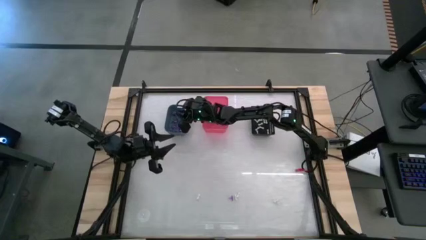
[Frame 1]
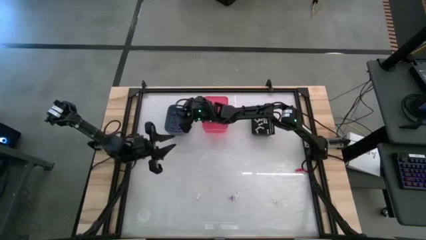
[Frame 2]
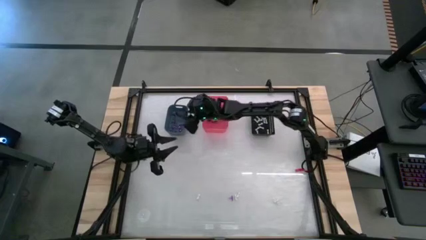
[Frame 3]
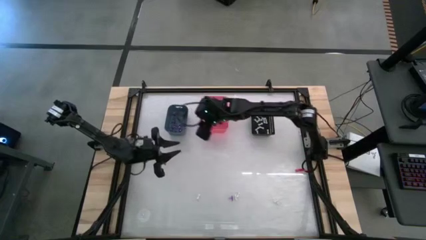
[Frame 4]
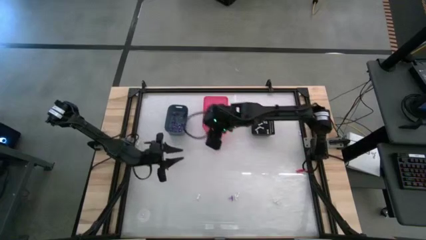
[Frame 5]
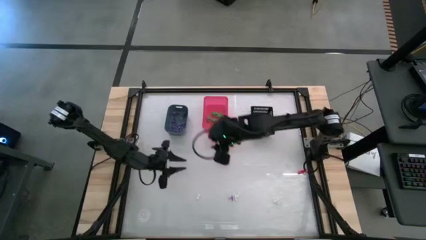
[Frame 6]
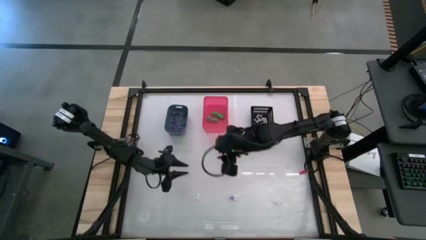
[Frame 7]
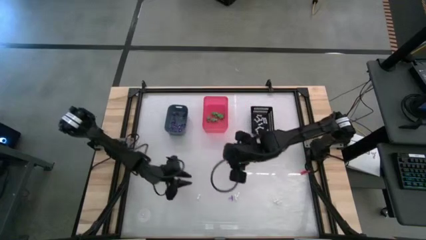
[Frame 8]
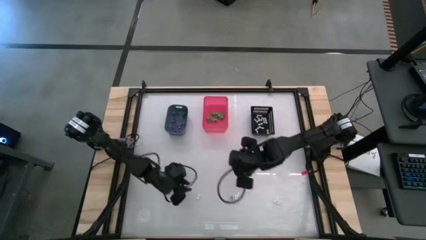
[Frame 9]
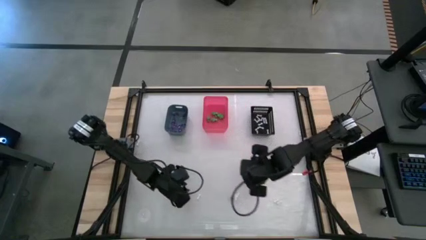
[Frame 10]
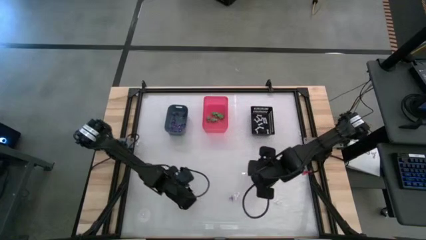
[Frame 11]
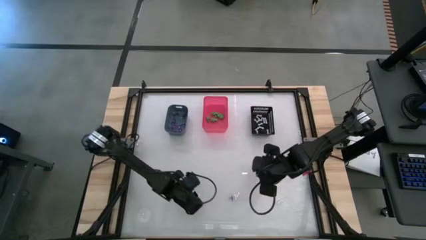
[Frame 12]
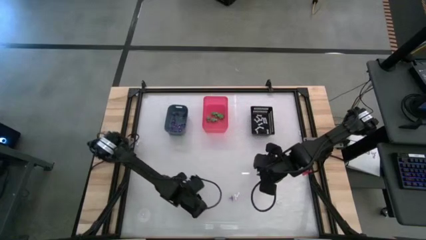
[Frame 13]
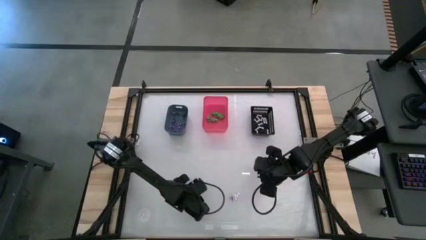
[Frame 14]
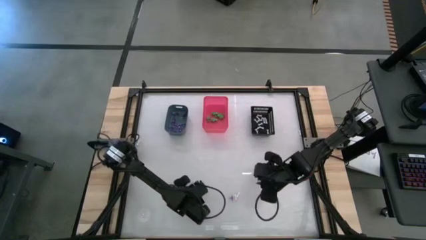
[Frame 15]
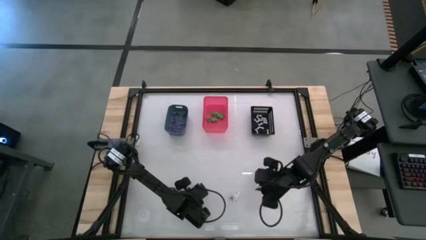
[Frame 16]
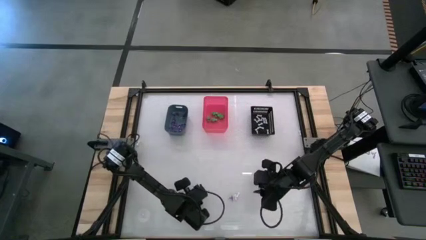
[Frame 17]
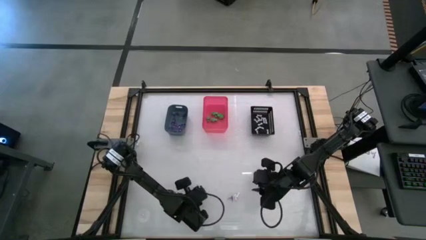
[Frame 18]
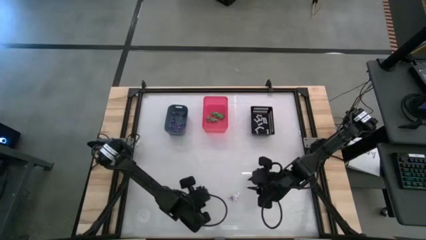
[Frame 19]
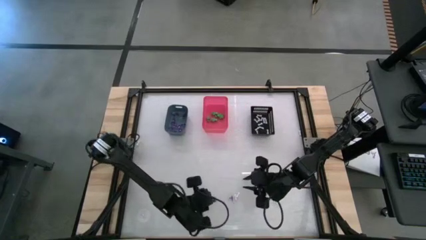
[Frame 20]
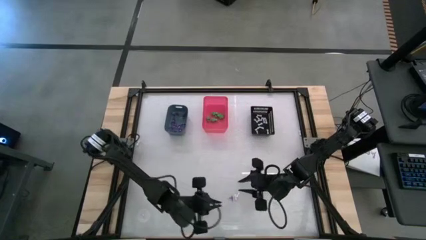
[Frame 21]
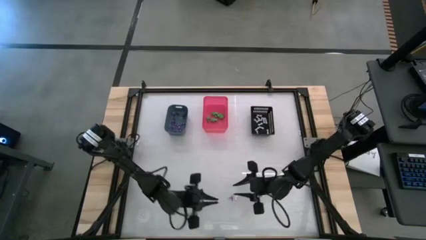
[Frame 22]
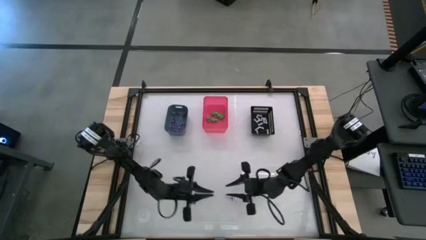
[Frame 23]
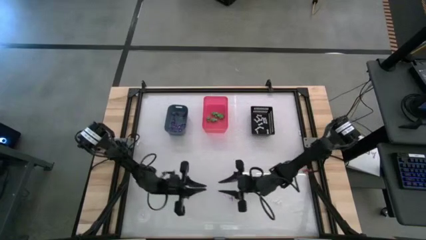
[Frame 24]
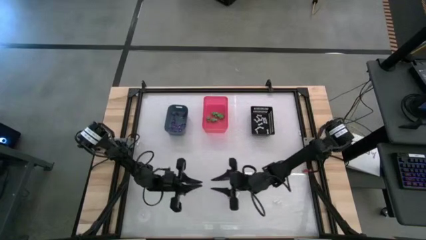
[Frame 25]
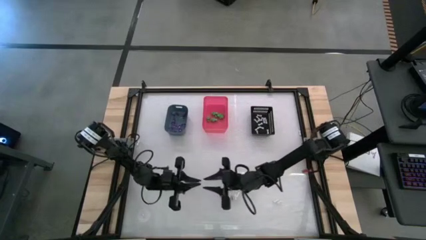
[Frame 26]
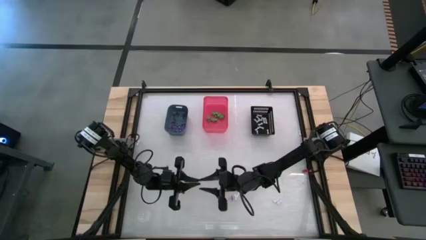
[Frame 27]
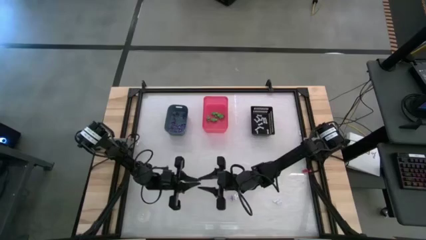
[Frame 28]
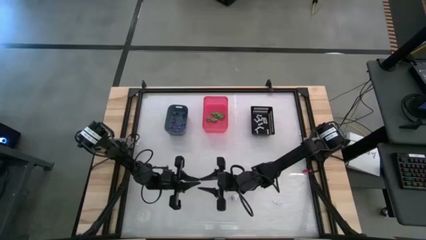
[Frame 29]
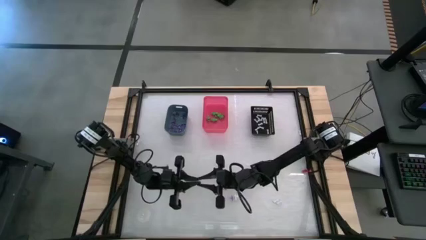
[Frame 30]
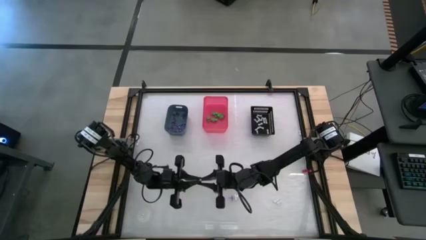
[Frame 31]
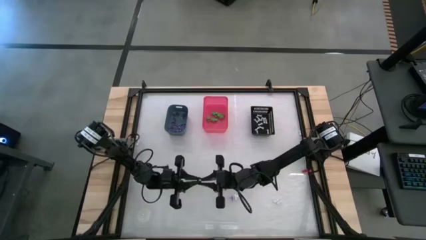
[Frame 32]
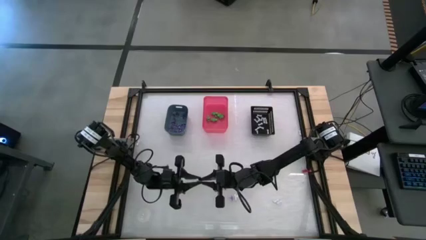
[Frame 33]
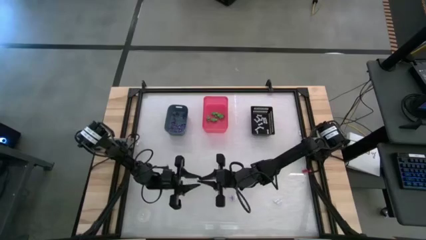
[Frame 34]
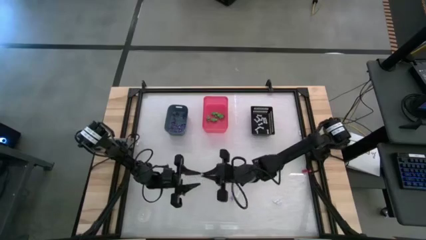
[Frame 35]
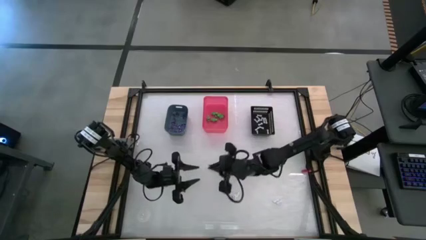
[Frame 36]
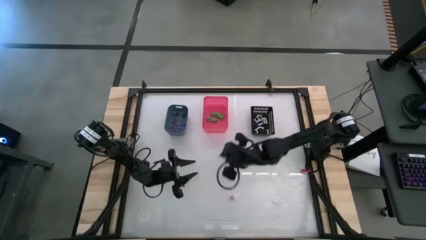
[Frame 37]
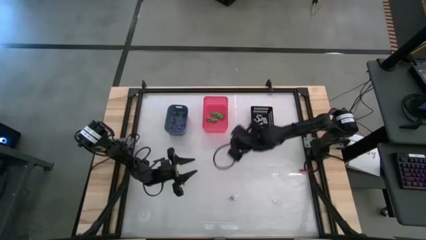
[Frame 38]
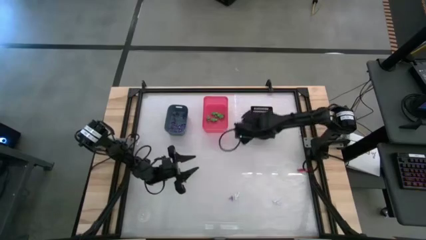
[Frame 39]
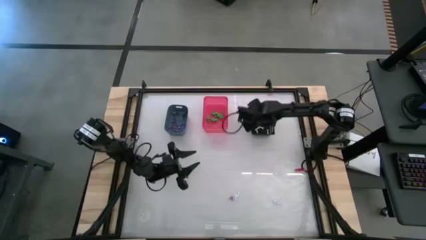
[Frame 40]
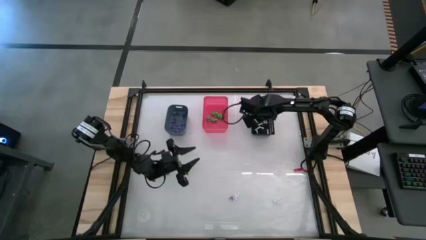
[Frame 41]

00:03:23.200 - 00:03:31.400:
Task: Sort Halloween decoration
Put the white bone toy into the black bin

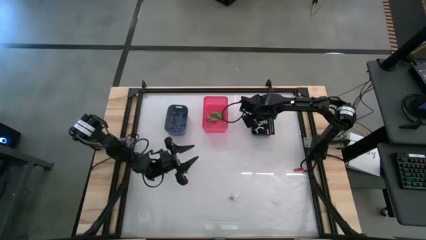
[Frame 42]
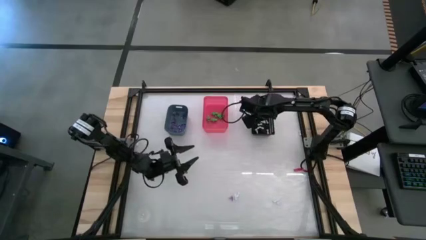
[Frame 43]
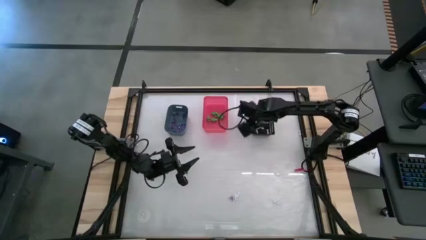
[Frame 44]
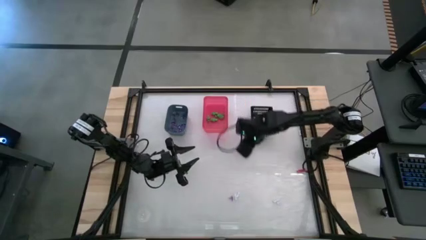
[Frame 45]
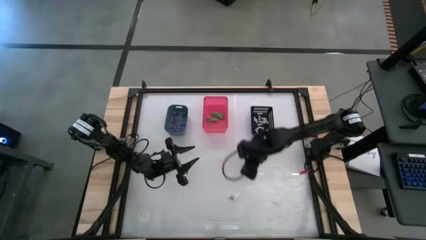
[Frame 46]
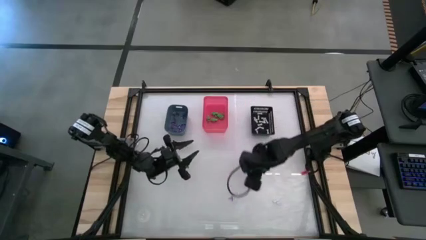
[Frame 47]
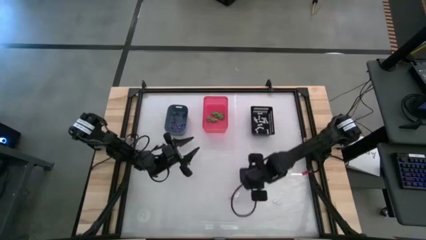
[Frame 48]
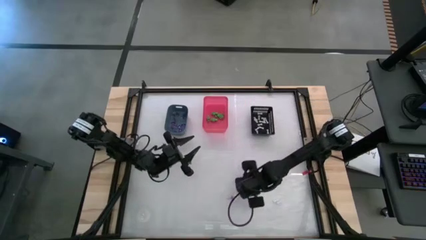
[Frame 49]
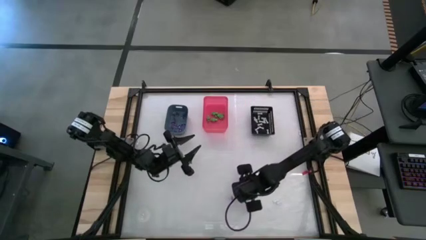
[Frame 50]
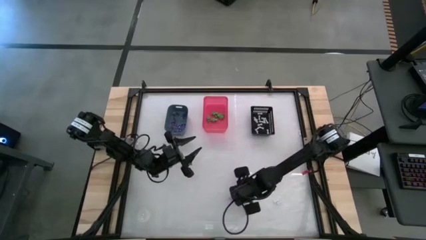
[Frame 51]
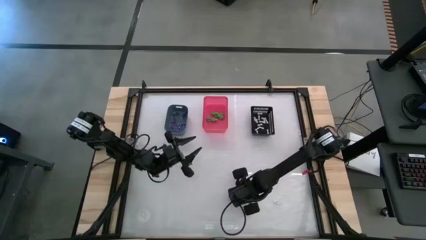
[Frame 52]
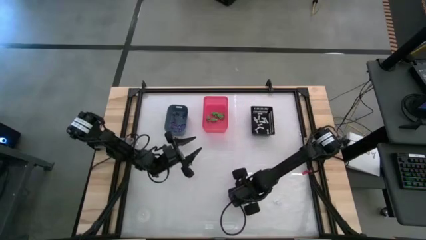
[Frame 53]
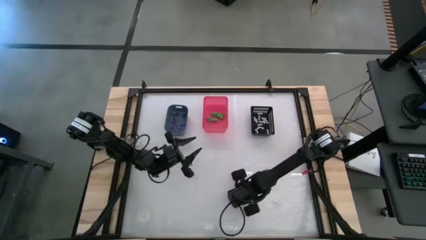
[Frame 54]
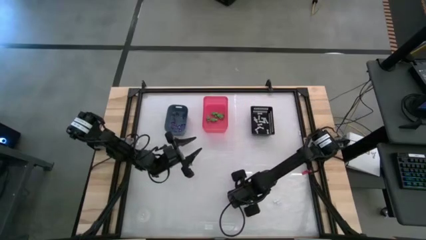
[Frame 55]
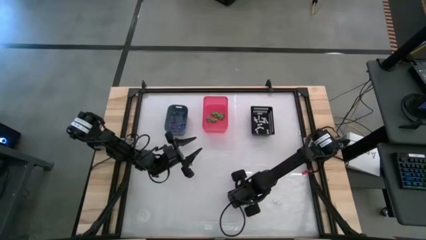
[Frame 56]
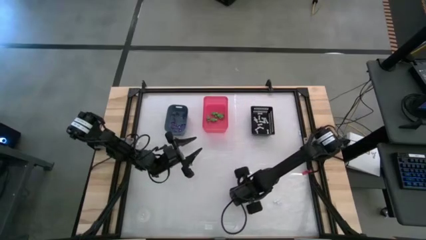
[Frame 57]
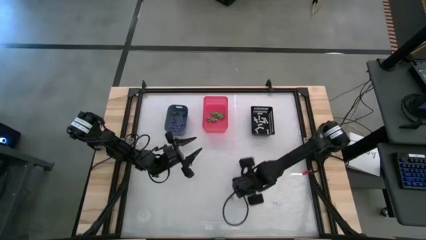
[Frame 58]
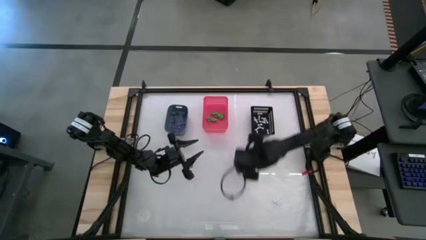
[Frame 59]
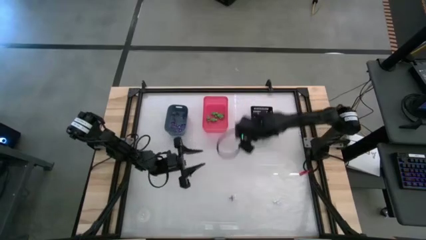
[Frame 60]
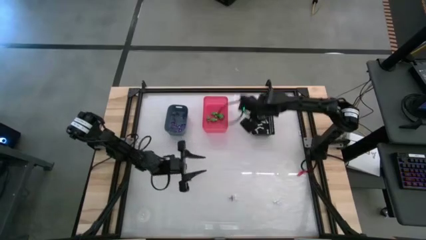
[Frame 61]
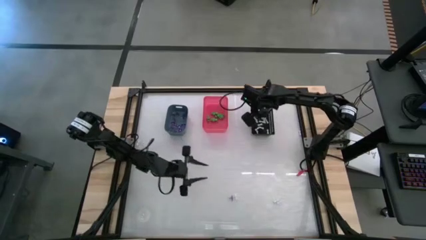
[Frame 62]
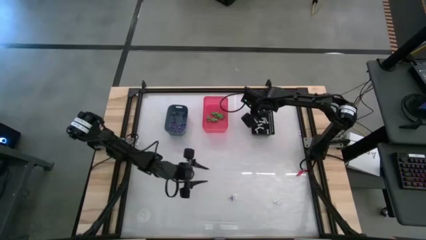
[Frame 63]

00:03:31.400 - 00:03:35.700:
Put the white bone toy into the black bin

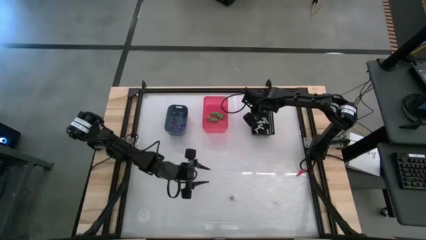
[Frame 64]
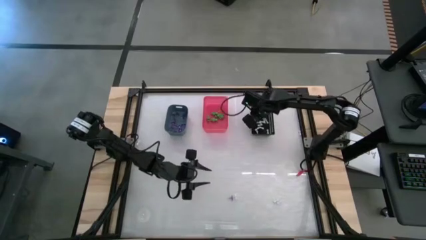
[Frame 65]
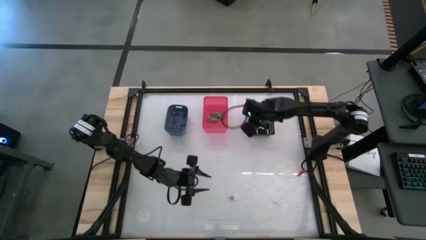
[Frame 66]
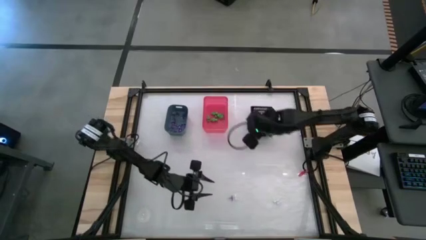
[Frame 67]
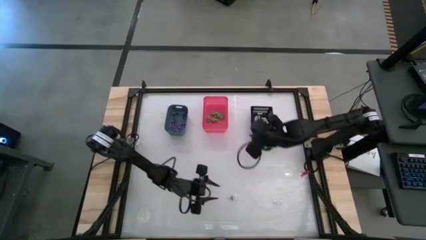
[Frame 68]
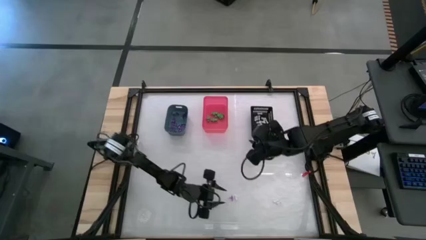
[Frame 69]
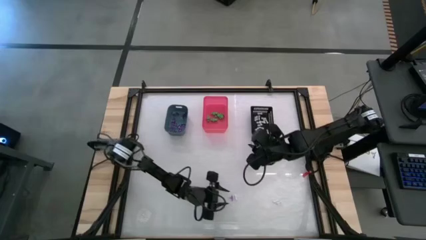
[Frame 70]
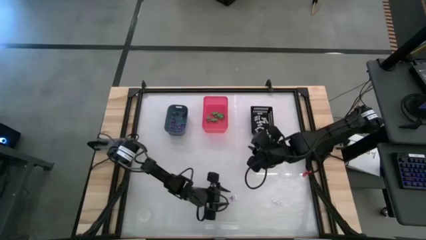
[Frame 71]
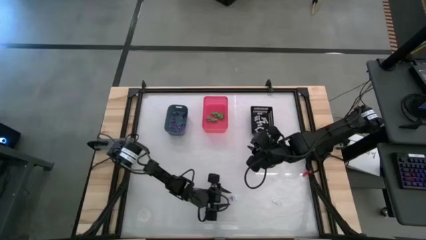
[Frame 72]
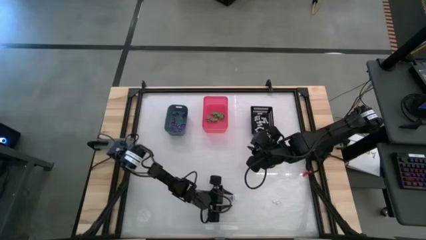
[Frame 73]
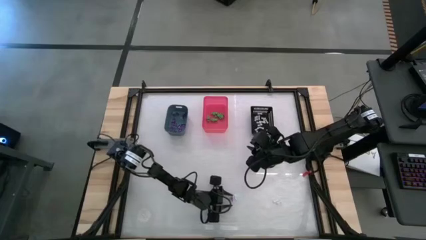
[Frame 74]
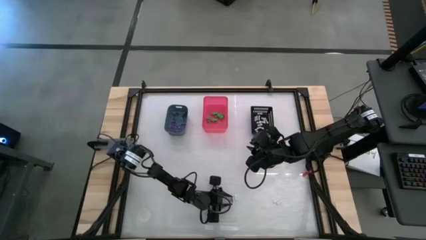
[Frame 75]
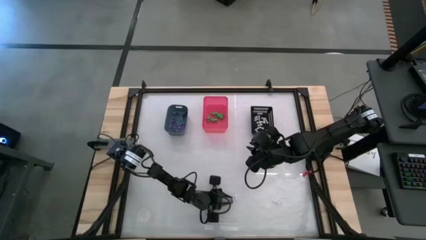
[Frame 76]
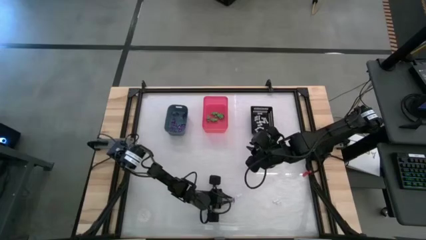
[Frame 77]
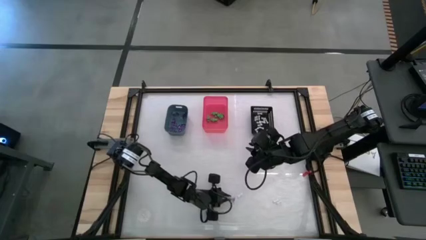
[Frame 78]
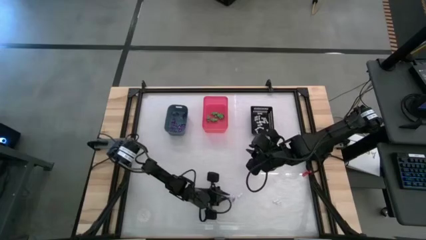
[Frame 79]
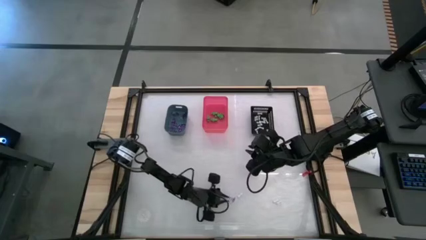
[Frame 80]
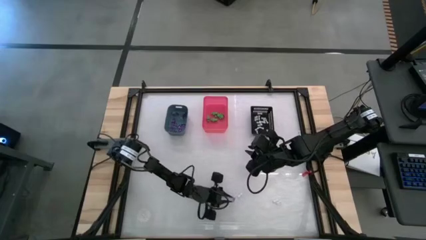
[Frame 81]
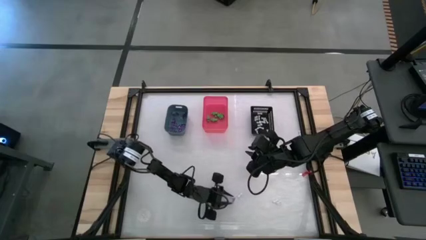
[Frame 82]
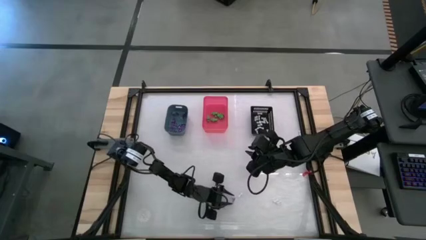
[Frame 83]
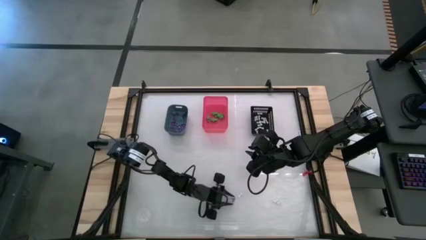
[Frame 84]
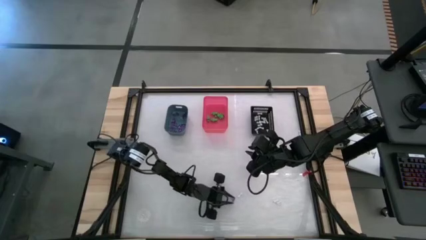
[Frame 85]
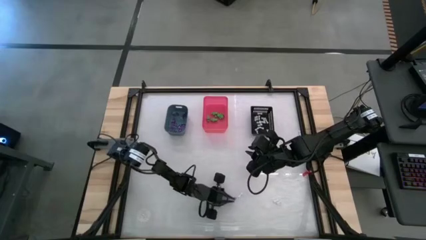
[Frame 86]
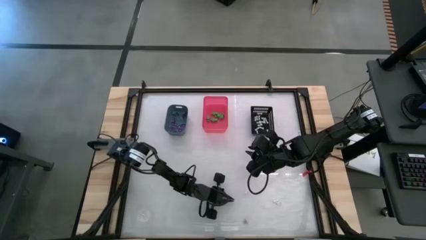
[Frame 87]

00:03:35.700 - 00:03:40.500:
Put the purple witch hat toy into the blue bin
